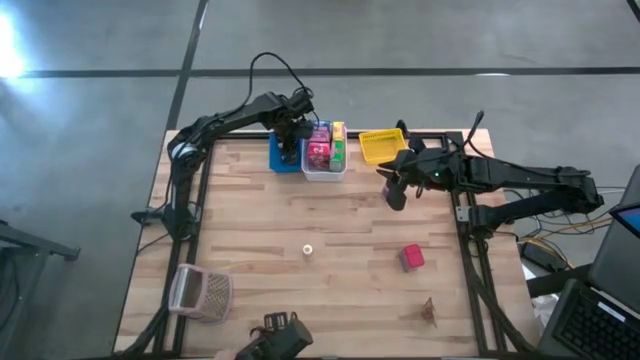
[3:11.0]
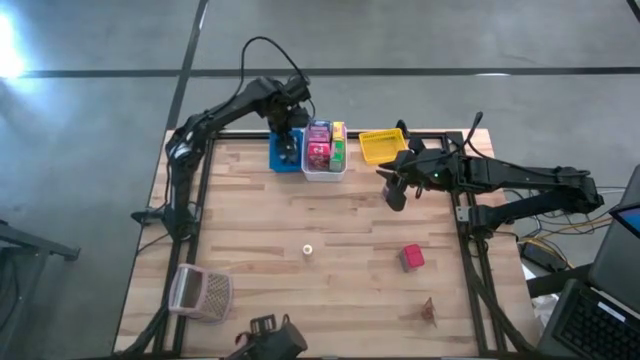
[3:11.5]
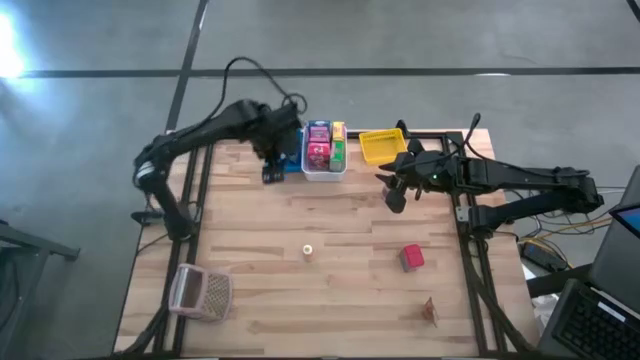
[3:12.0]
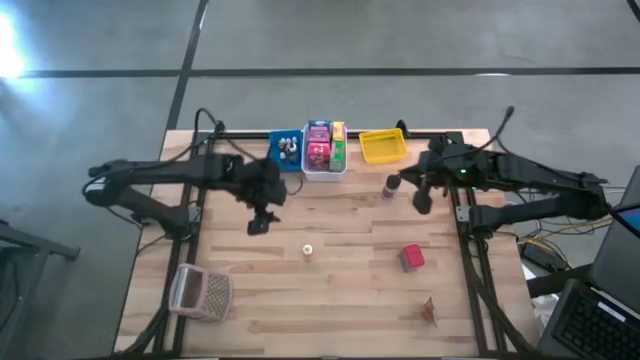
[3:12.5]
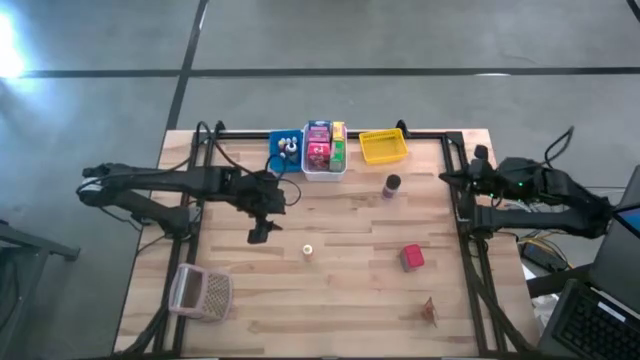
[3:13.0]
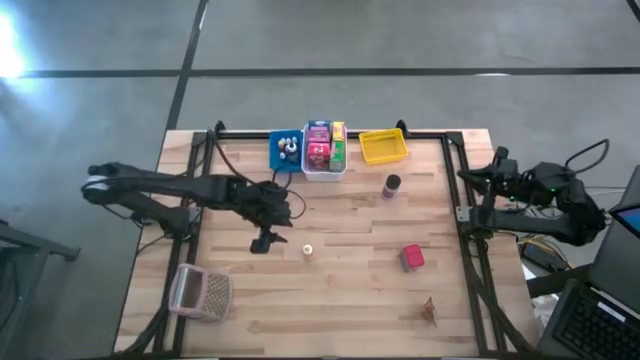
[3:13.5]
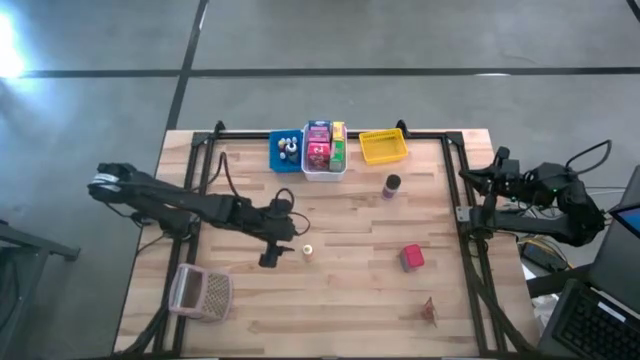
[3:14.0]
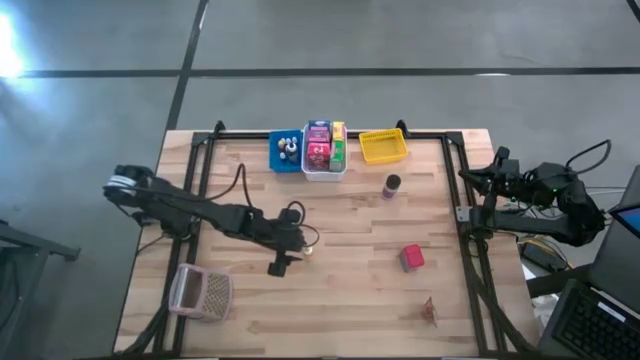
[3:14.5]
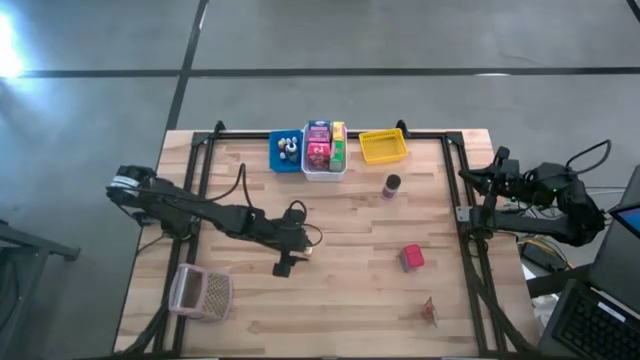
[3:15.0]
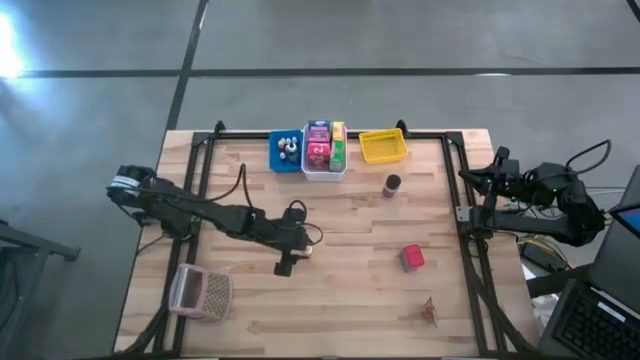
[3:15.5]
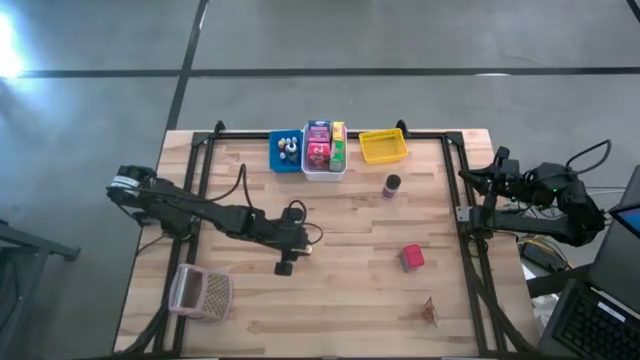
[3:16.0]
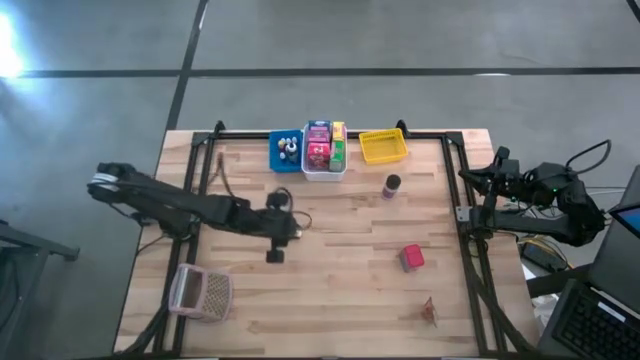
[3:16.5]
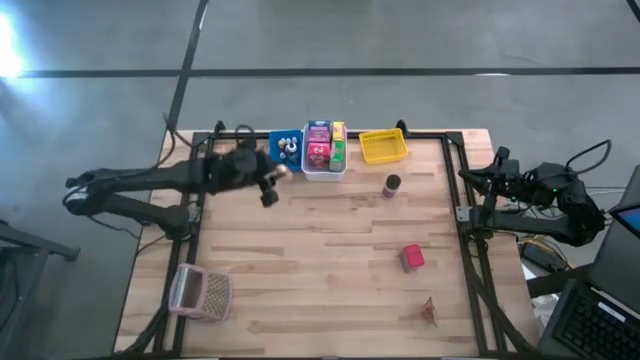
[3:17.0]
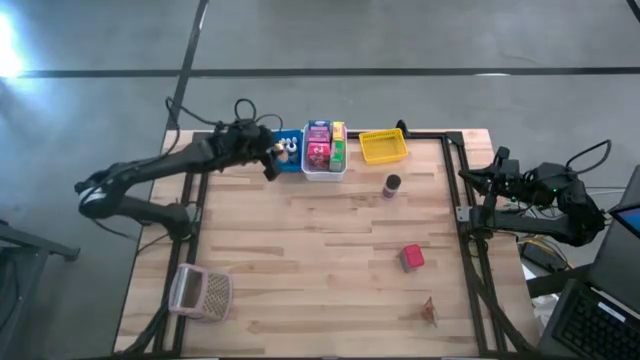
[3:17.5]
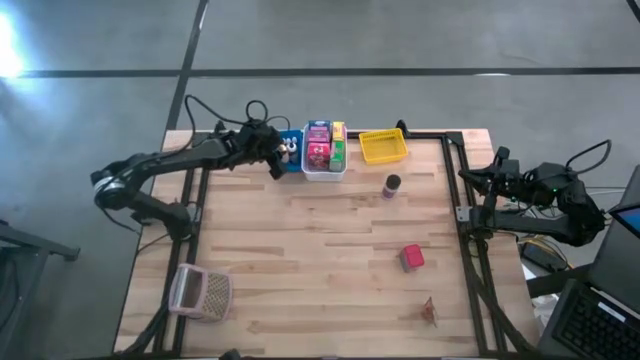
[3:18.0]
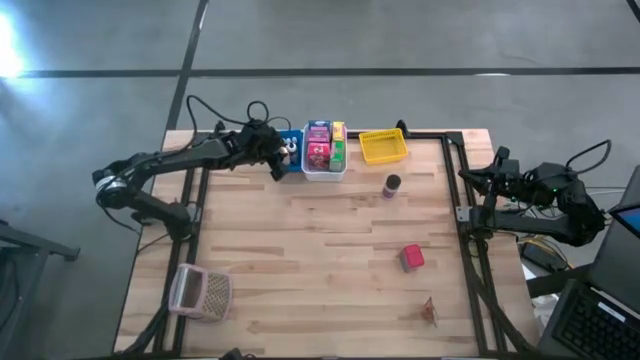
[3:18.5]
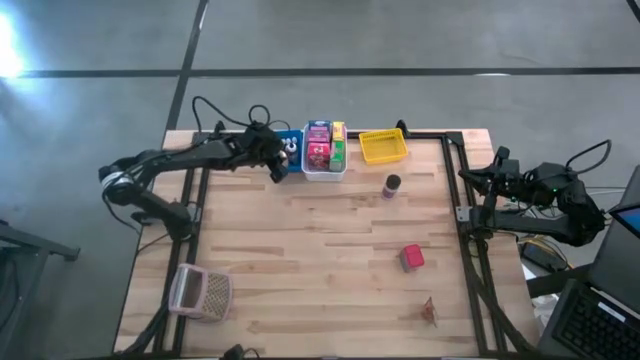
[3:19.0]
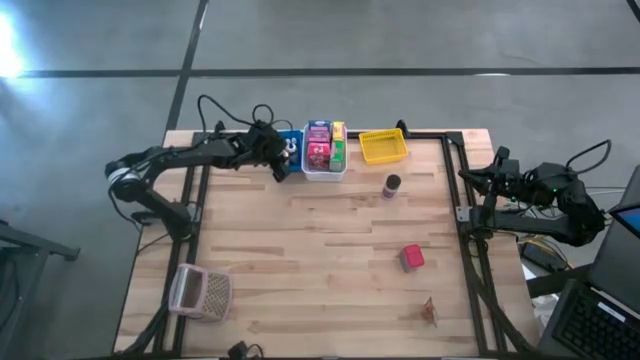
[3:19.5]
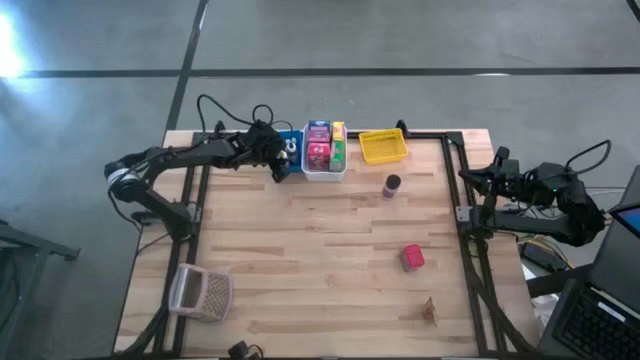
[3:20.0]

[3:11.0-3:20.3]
Task: Pick & Place Kitchen Items
Put the large yellow food coloring bottle into the blue bin

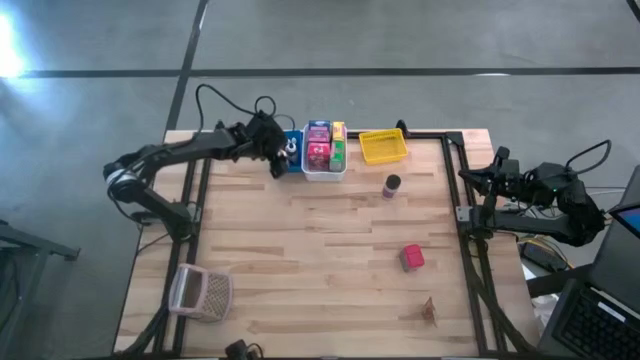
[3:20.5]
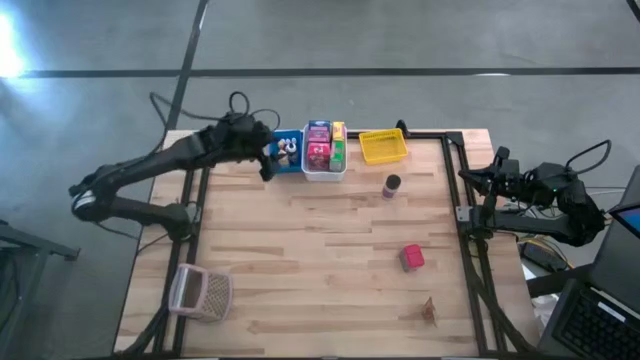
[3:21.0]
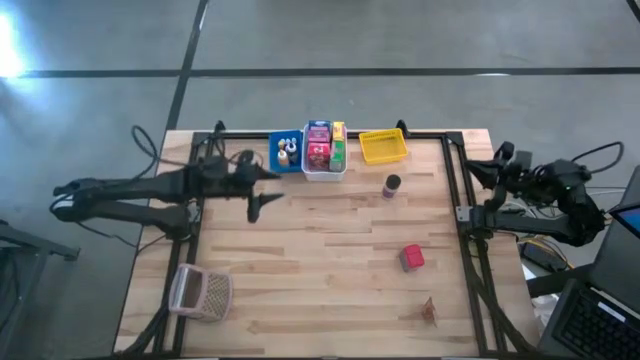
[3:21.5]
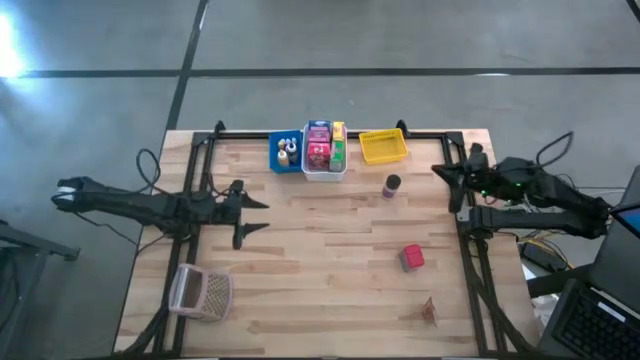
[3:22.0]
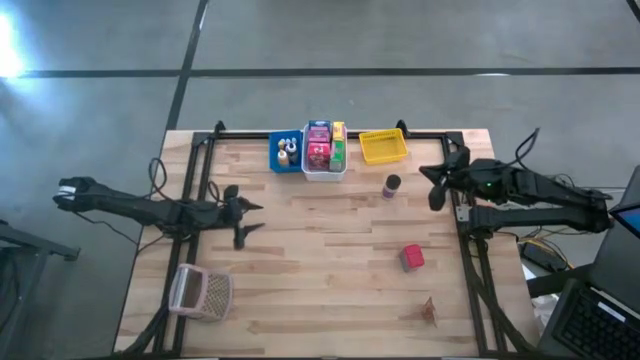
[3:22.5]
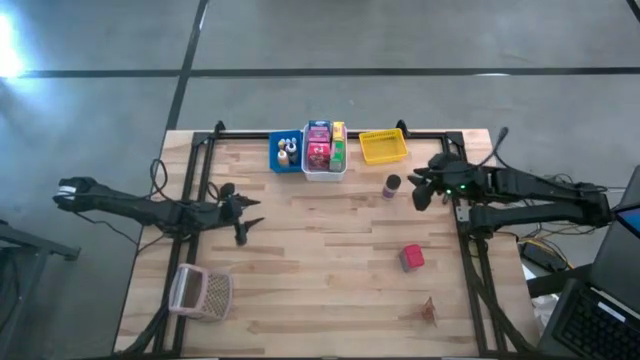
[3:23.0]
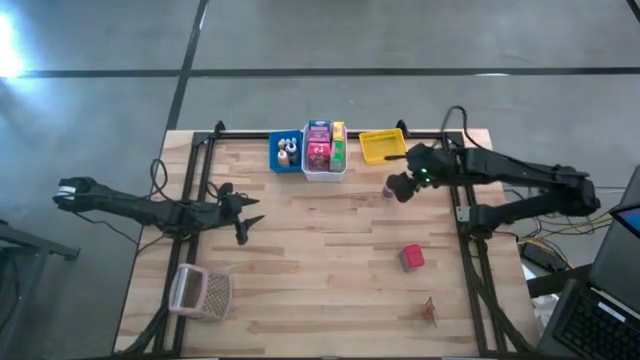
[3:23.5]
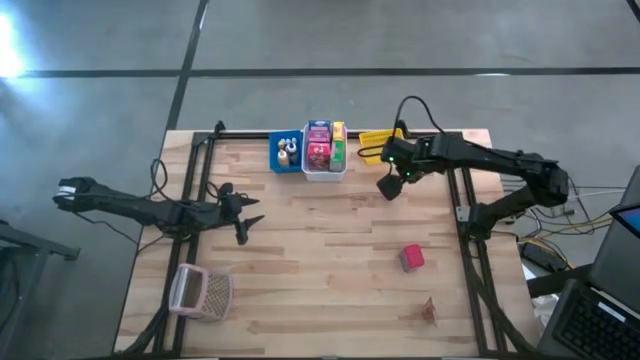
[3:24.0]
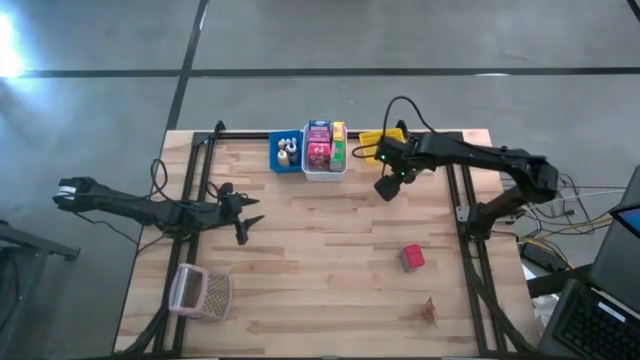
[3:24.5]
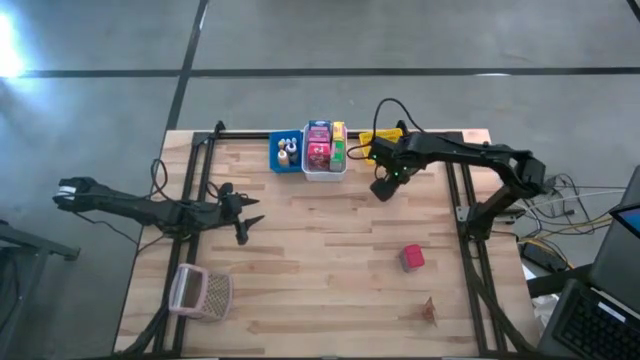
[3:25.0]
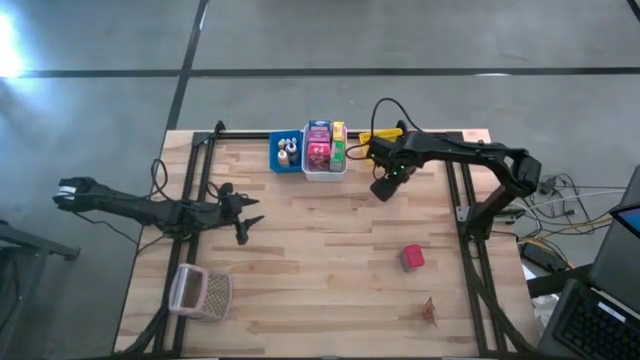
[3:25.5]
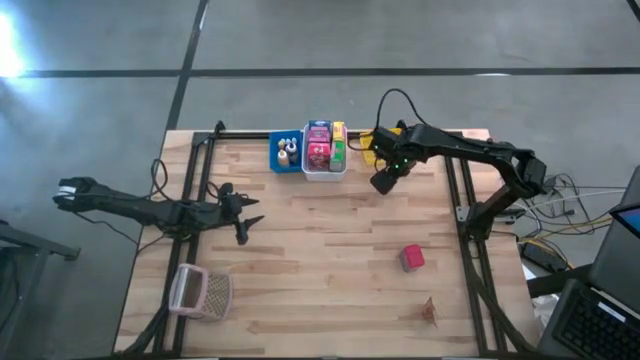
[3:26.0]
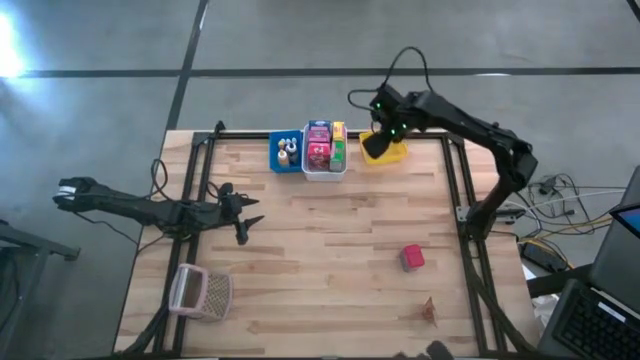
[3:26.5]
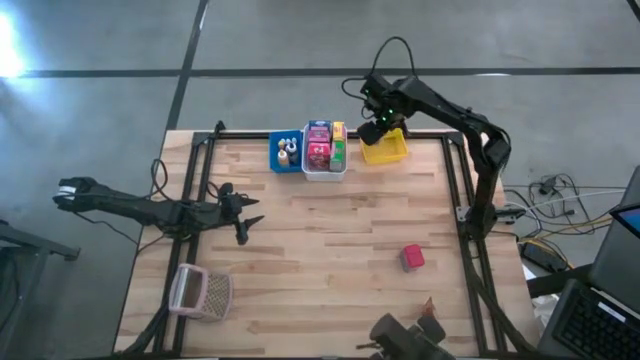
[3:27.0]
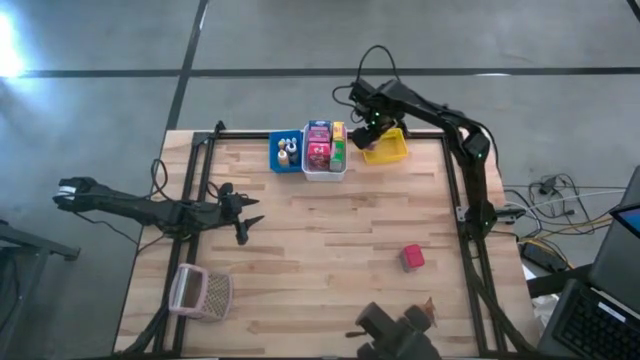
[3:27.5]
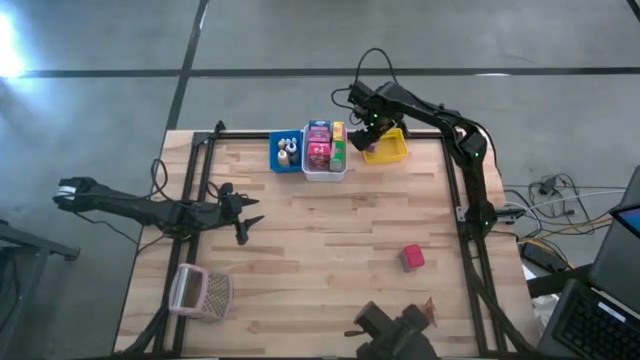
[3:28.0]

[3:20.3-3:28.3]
Put the black spice bottle into the yellow bin

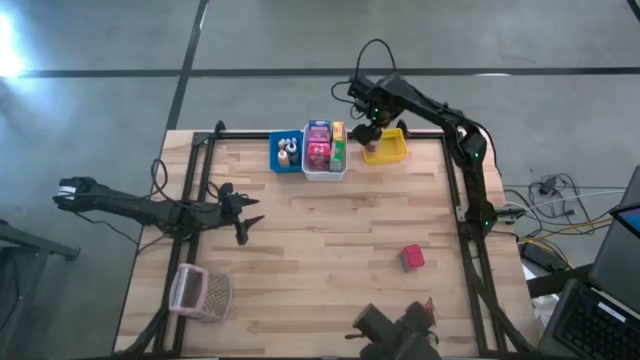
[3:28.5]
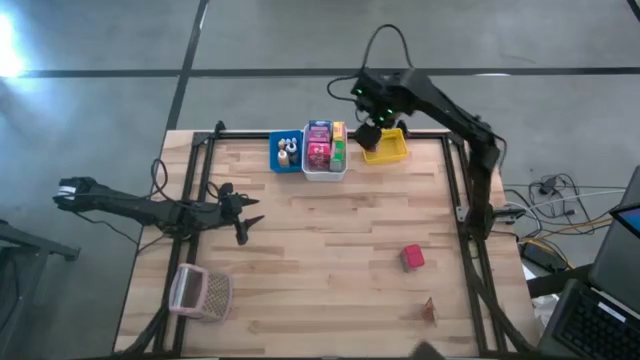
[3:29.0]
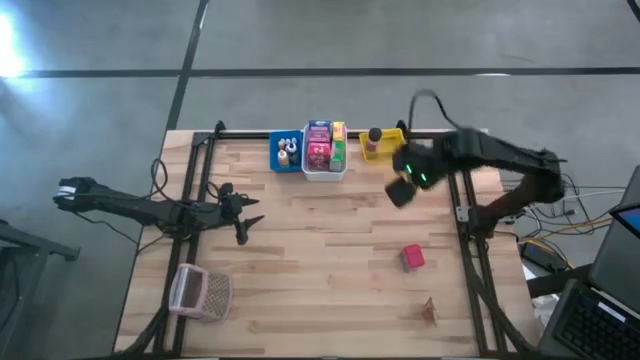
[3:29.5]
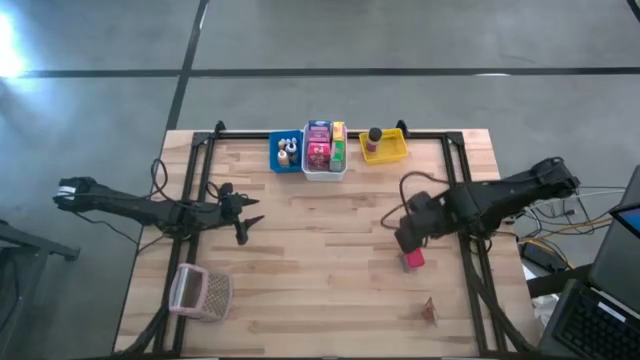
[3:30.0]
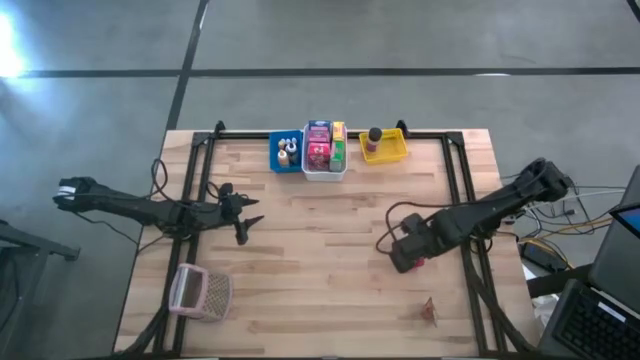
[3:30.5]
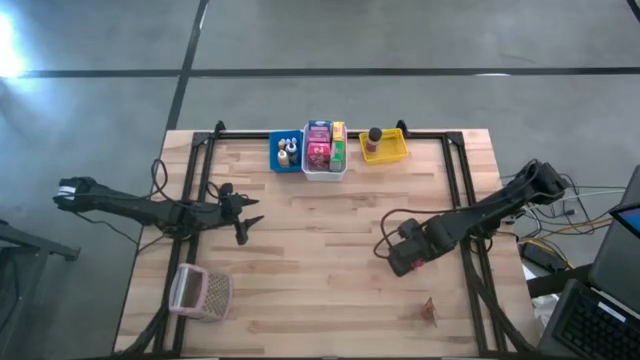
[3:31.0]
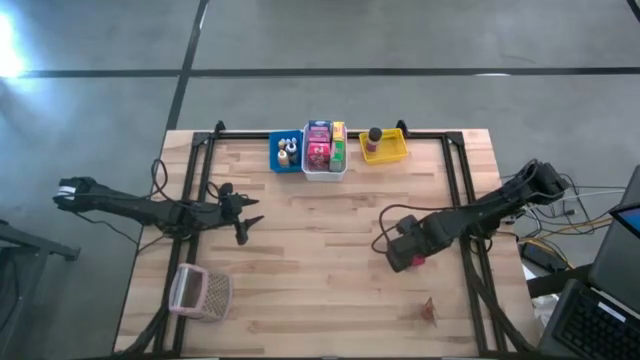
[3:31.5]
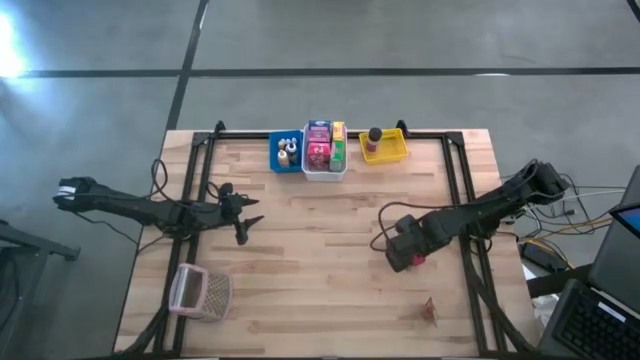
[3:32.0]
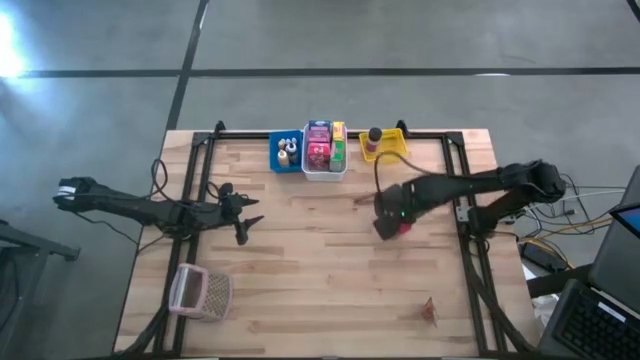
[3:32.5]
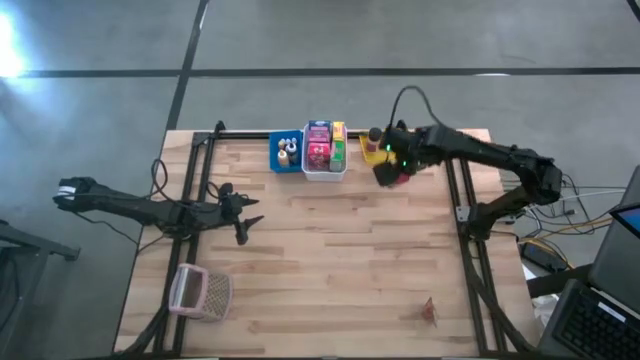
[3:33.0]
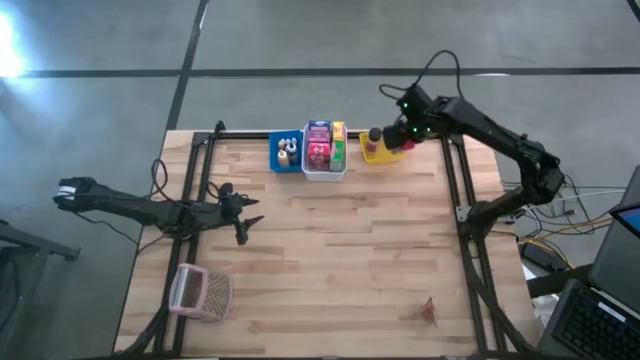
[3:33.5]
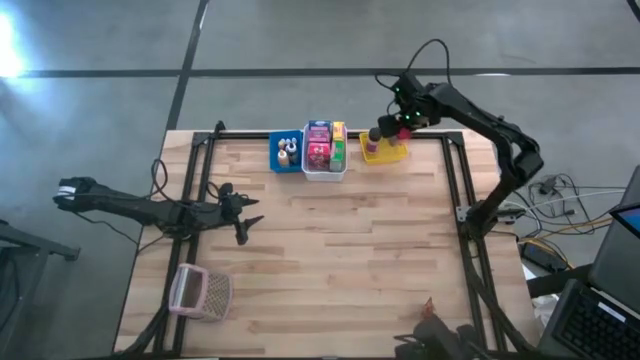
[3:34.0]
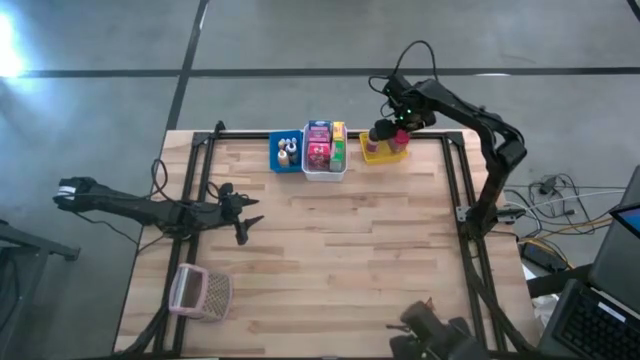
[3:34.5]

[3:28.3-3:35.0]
Put the red spice can into the yellow bin
